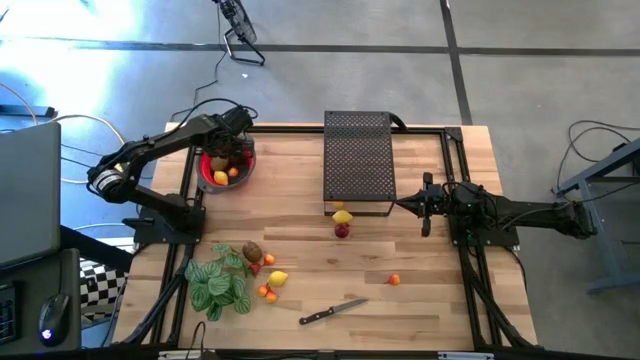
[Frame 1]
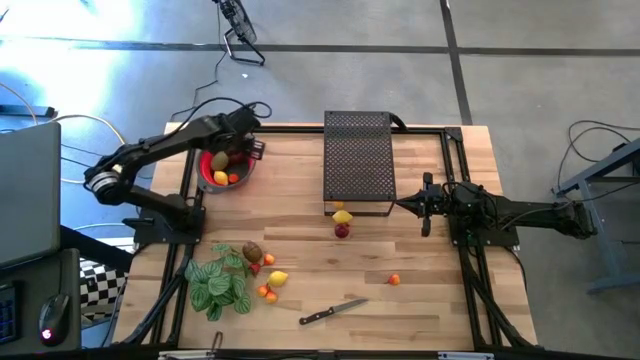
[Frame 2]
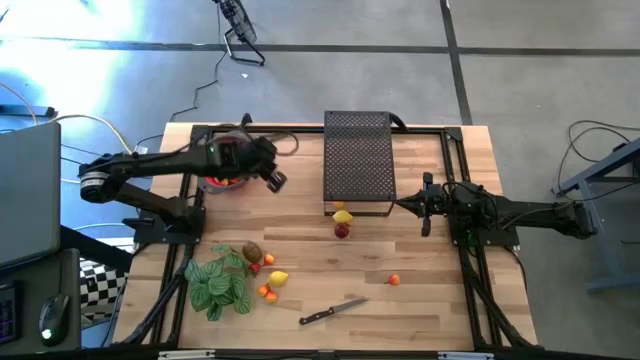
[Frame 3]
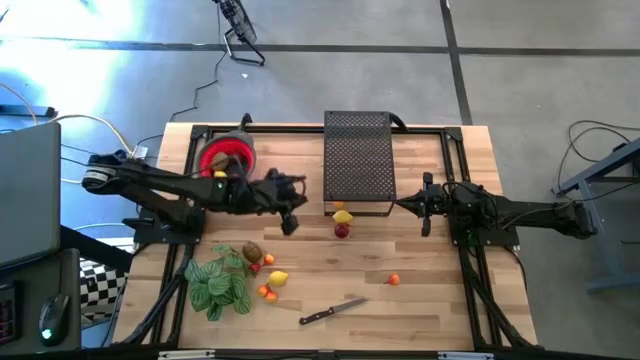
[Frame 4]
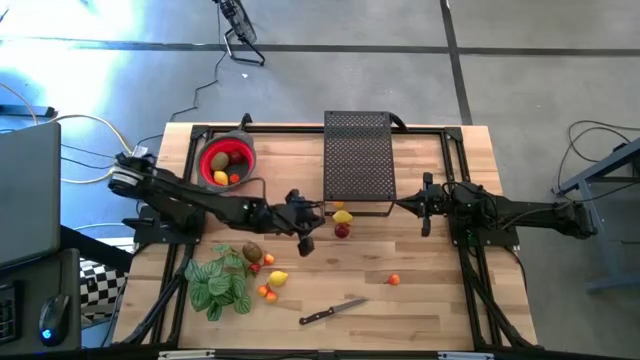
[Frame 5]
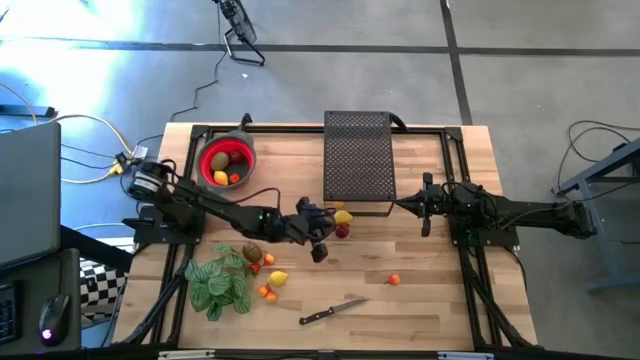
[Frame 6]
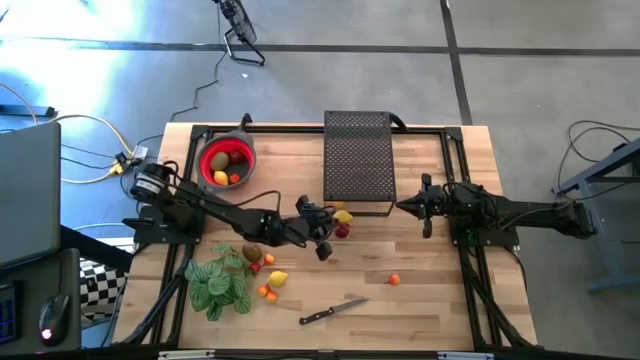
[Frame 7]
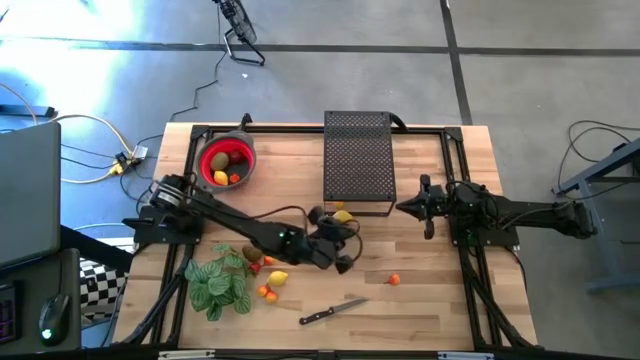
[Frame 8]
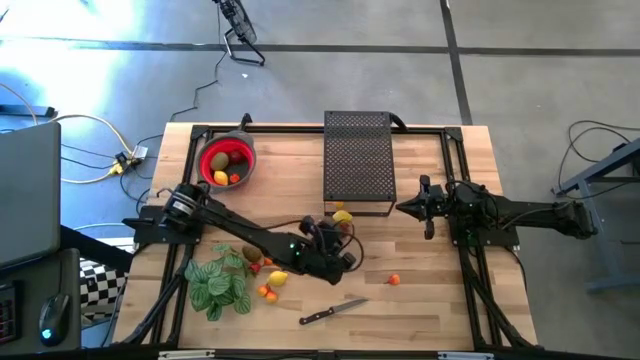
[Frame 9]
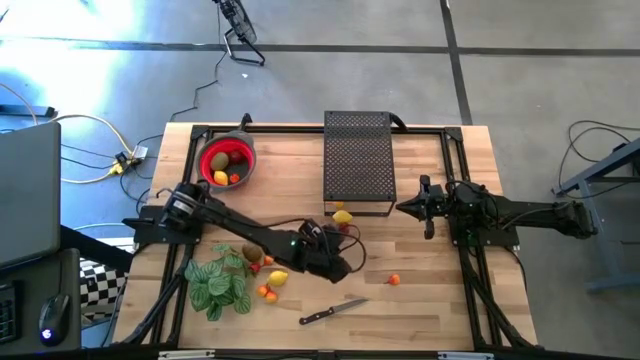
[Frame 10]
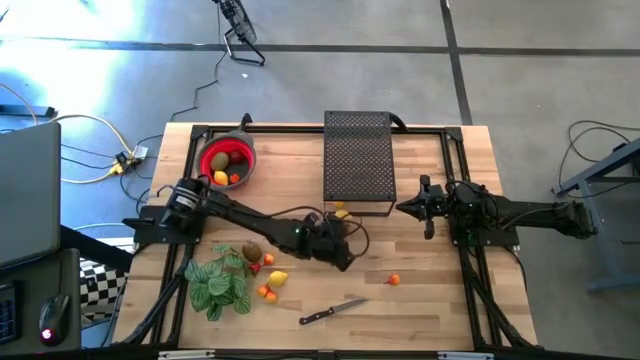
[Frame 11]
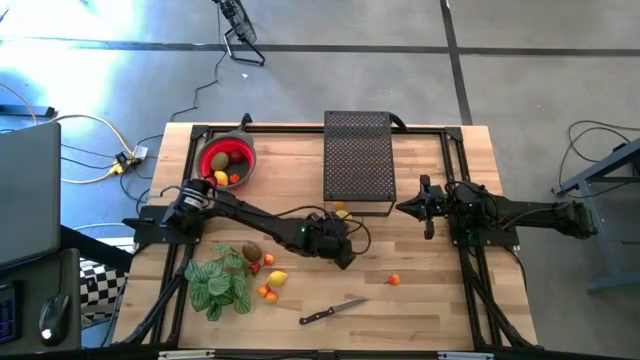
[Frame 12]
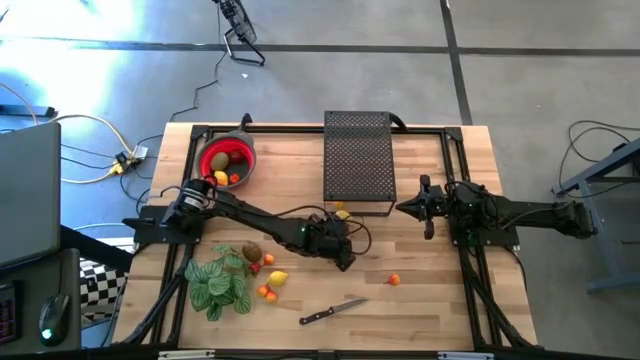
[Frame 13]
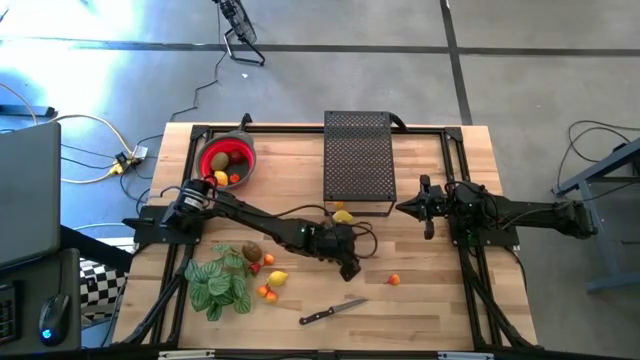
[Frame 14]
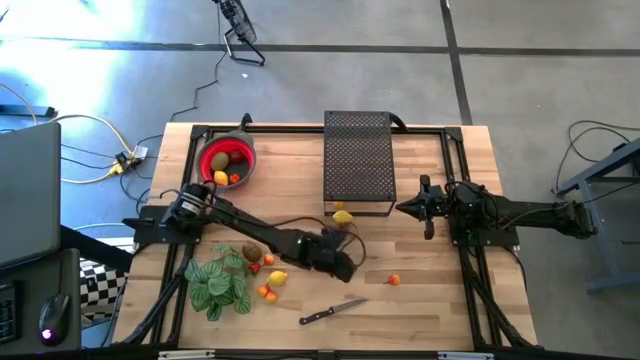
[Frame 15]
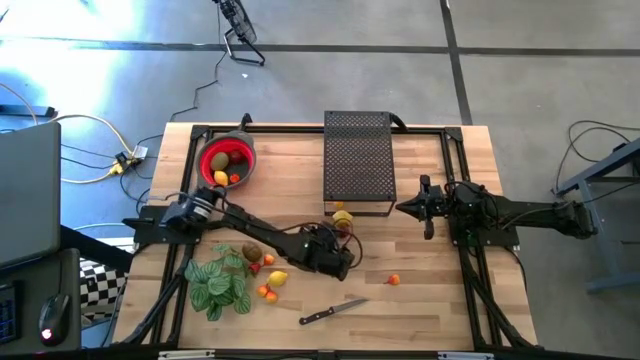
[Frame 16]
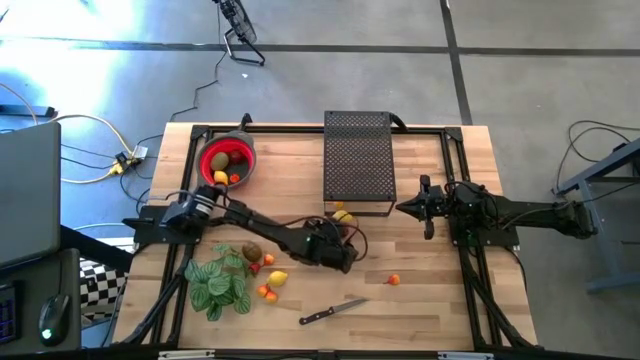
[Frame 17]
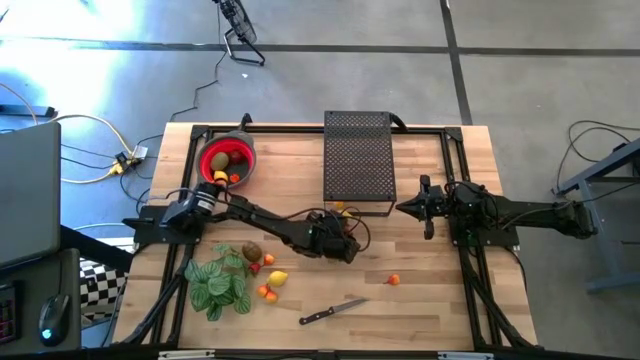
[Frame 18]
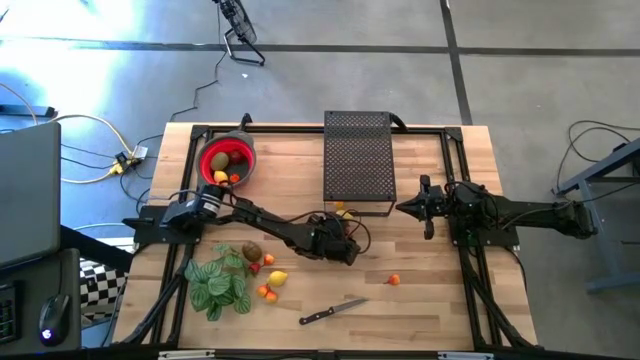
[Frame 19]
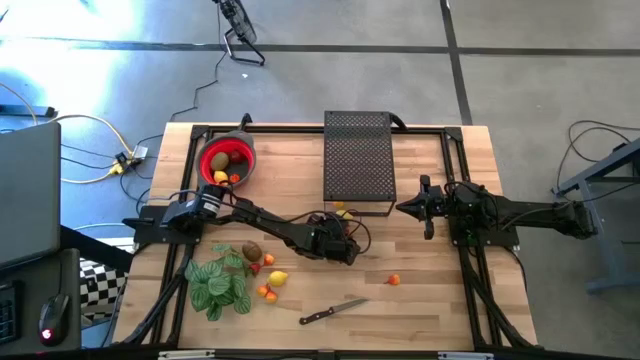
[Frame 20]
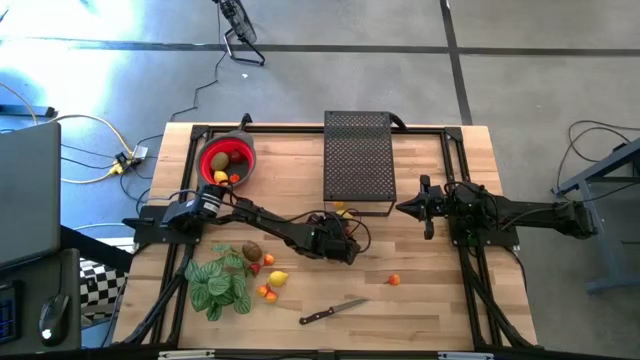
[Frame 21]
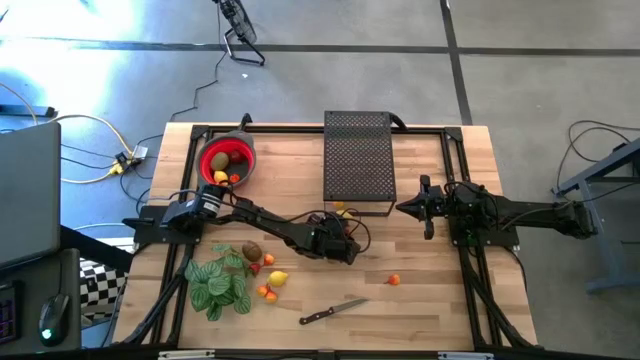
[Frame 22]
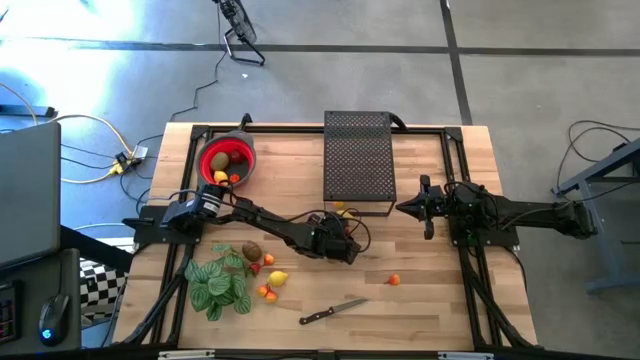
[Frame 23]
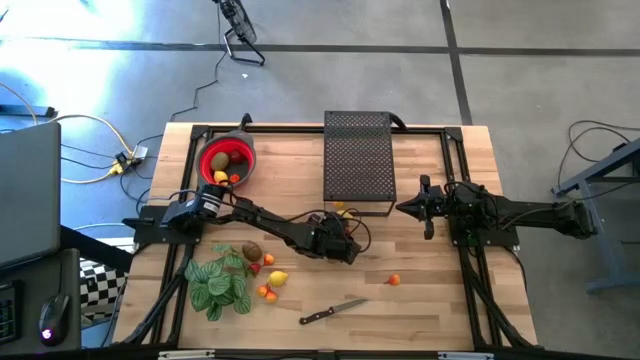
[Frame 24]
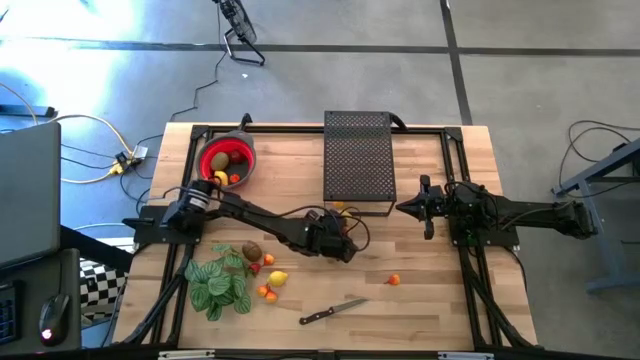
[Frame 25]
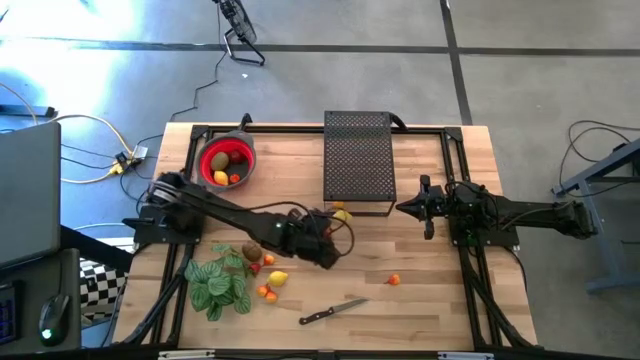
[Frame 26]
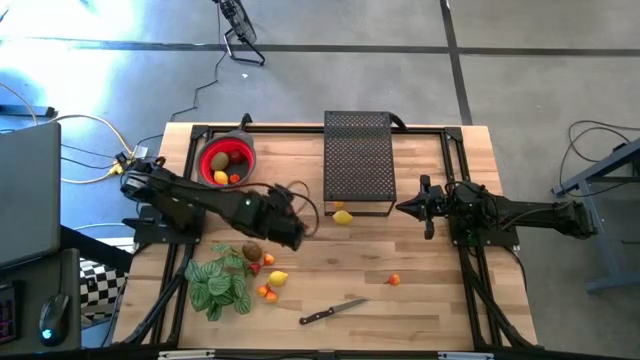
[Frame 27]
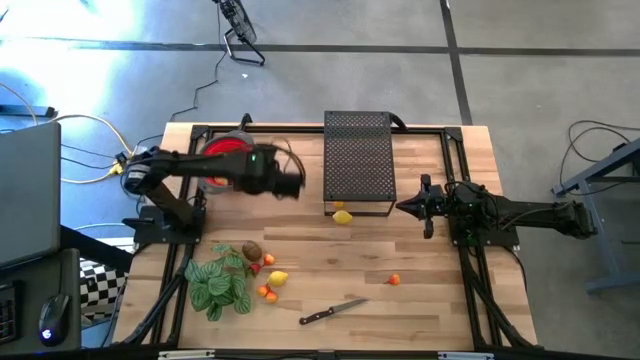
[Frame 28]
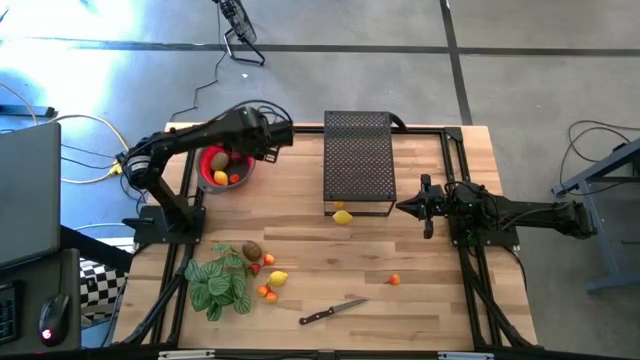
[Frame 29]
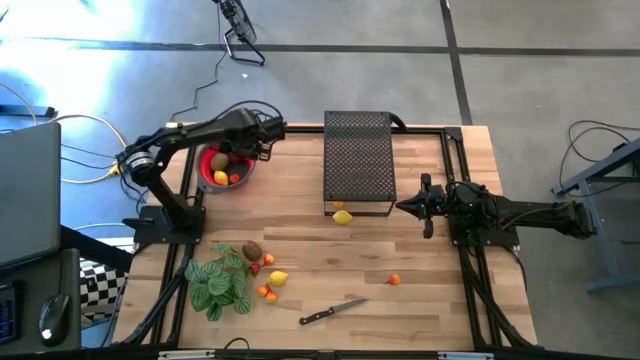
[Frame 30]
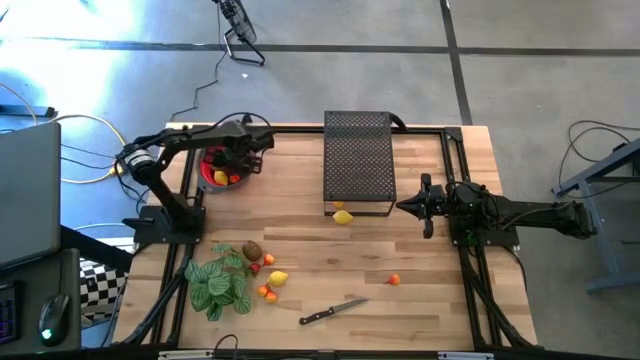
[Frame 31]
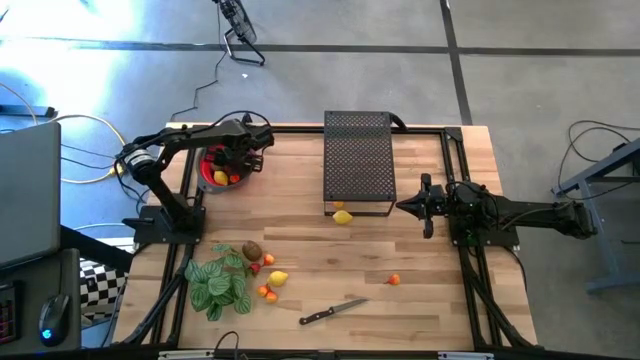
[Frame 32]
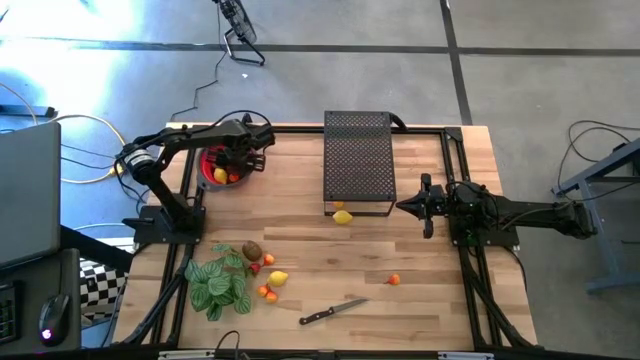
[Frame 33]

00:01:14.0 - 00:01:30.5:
Task: Pick & Place Fruit
Put the red Pomegranate into the strainer bowl

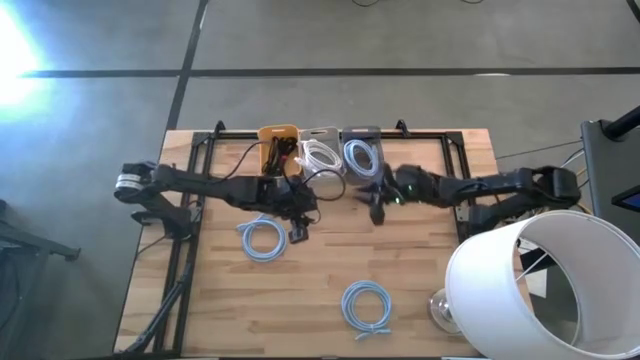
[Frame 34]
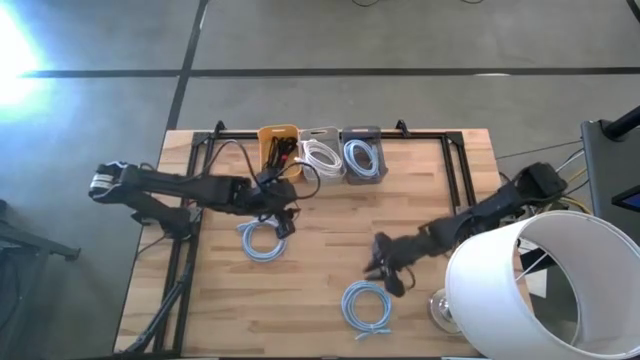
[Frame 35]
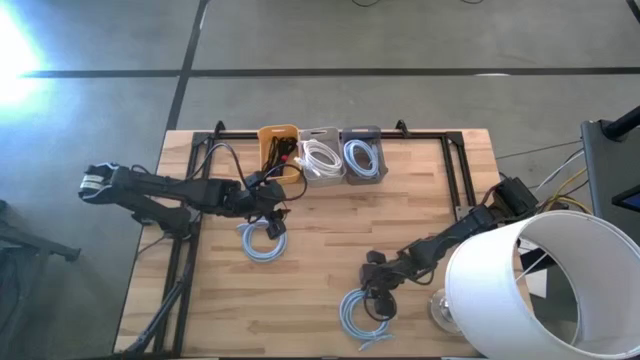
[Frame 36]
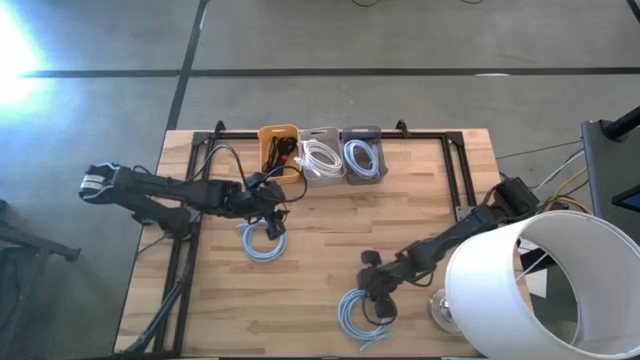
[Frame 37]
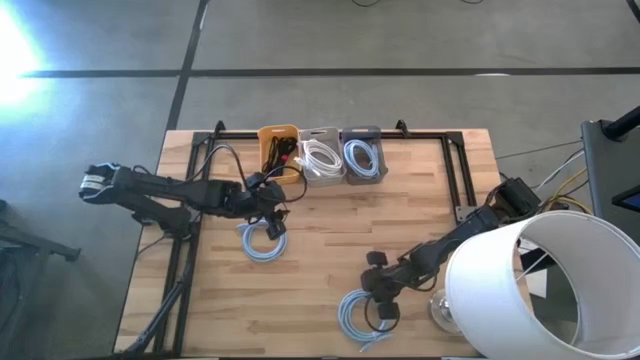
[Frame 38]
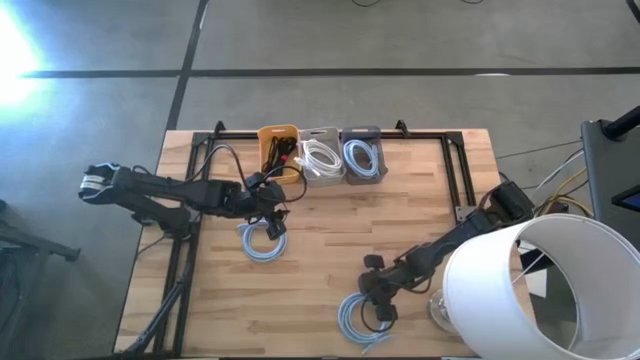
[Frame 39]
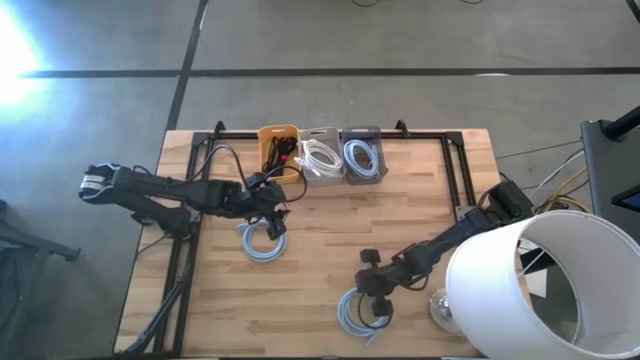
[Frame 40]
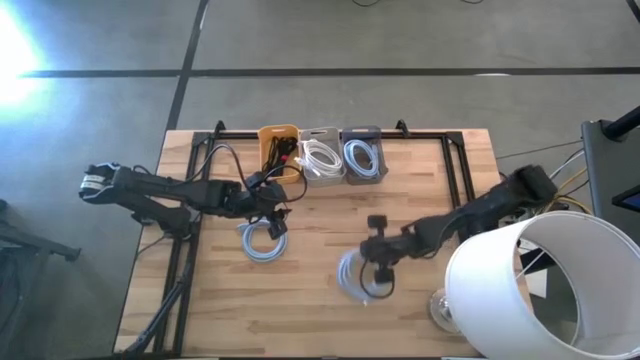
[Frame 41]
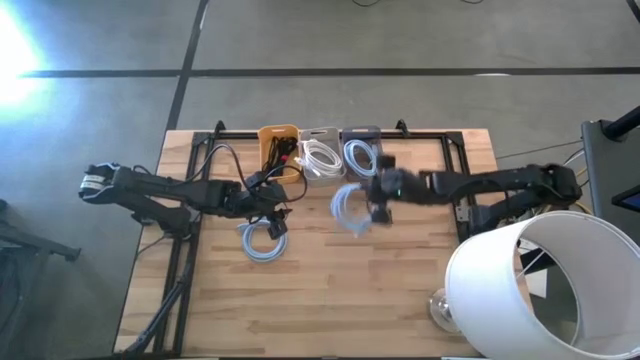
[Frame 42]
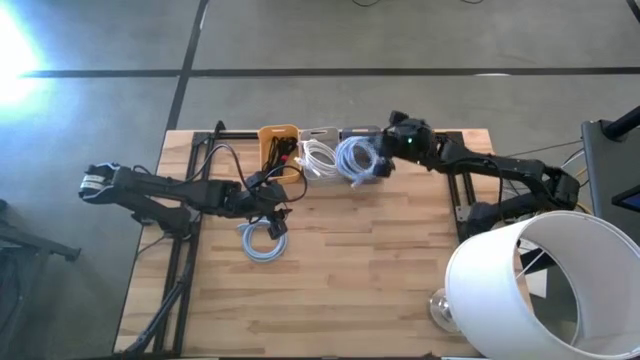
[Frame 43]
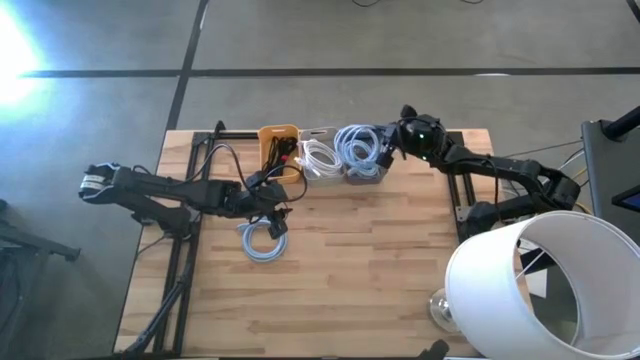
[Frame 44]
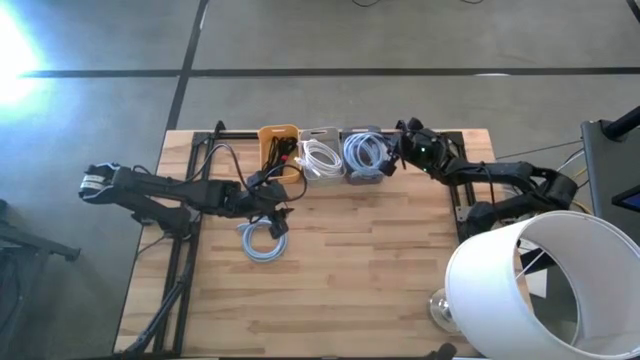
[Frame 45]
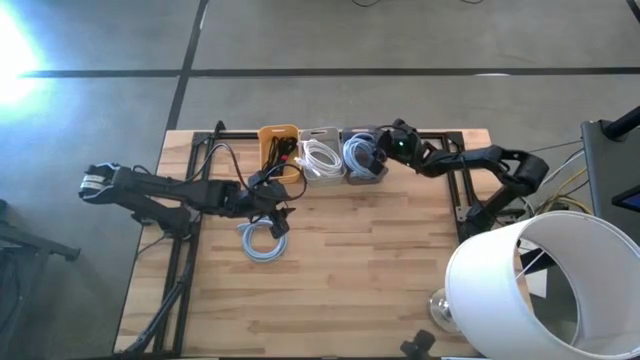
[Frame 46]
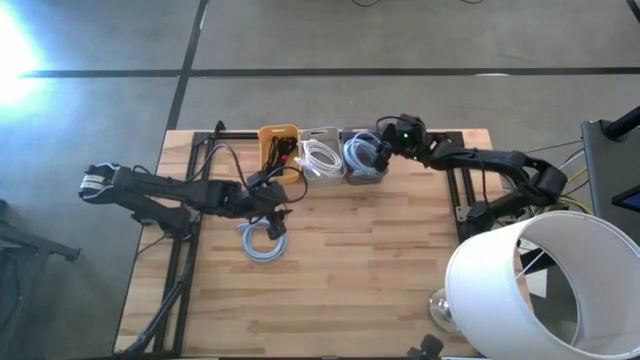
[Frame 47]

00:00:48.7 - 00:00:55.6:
Task: Pick & Place USB Port
Put the bottom blue display cable into the black bin
